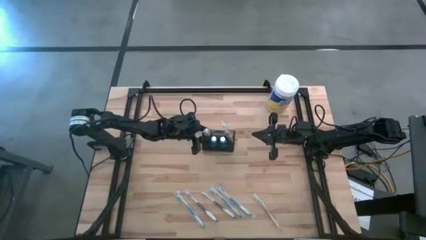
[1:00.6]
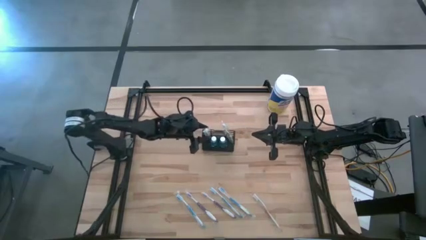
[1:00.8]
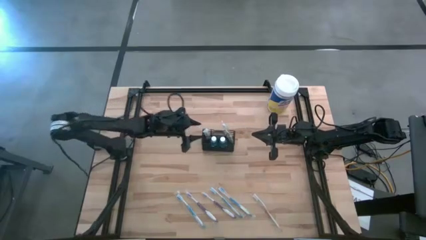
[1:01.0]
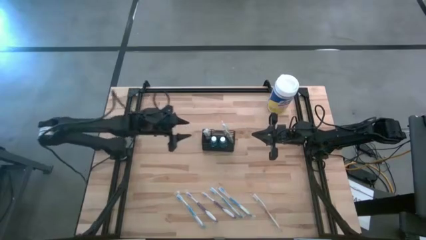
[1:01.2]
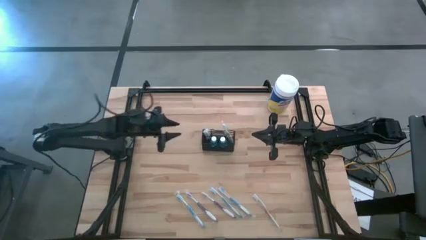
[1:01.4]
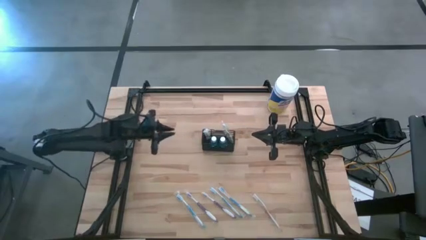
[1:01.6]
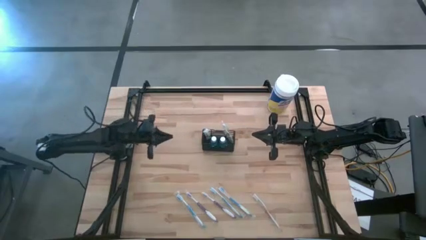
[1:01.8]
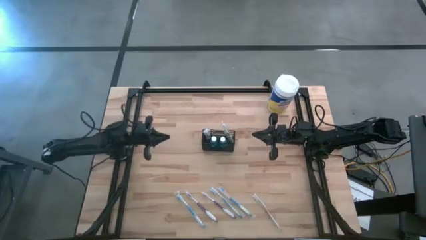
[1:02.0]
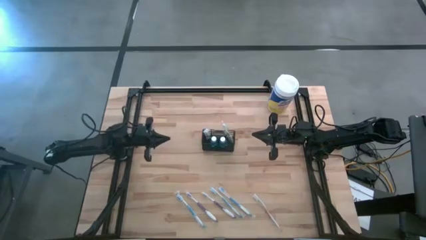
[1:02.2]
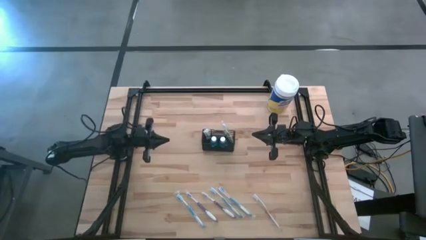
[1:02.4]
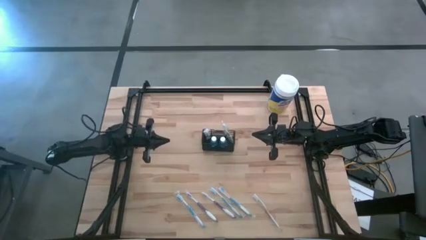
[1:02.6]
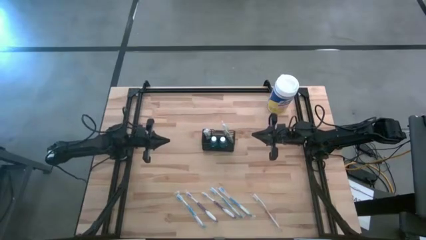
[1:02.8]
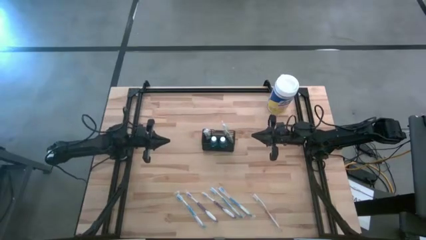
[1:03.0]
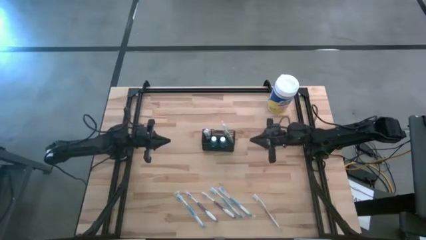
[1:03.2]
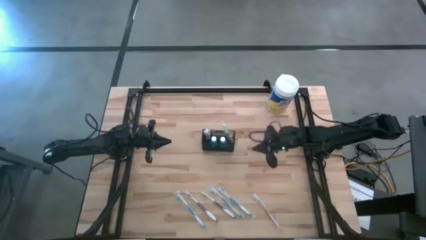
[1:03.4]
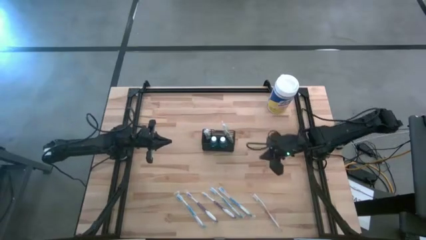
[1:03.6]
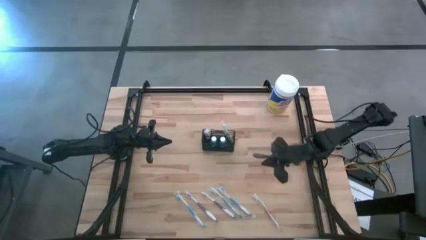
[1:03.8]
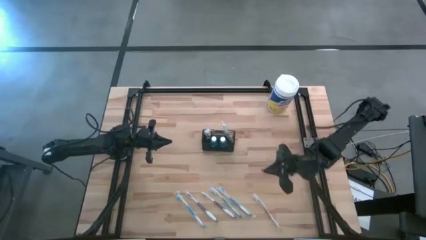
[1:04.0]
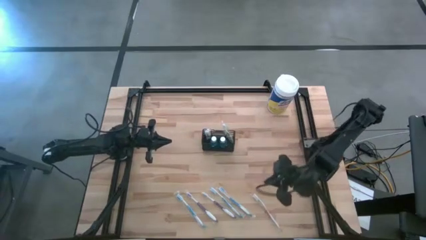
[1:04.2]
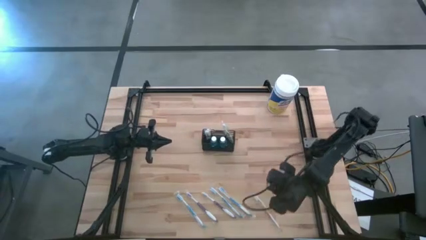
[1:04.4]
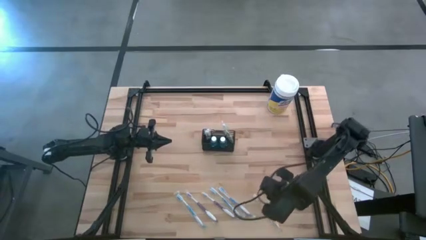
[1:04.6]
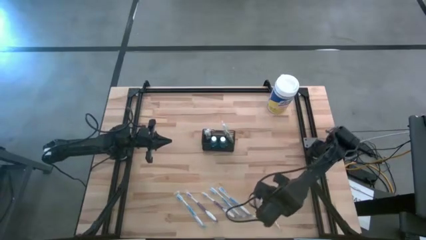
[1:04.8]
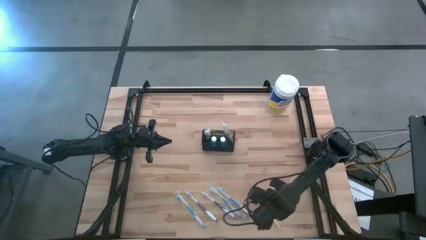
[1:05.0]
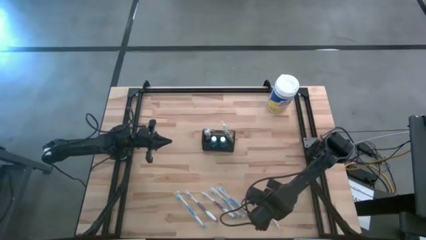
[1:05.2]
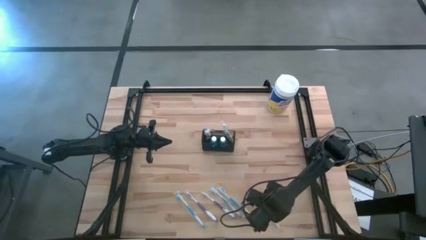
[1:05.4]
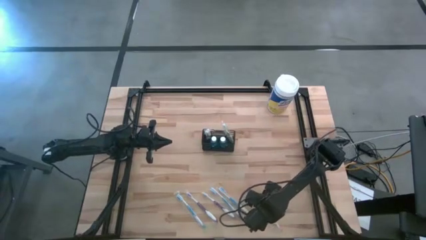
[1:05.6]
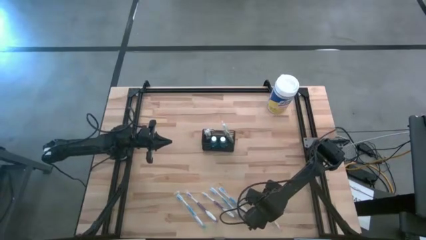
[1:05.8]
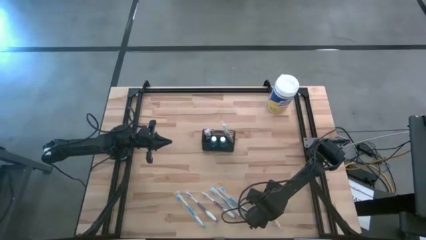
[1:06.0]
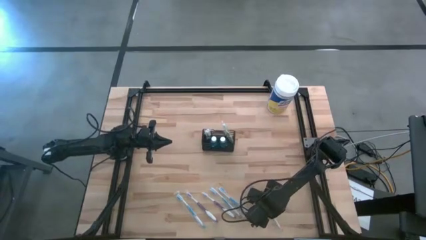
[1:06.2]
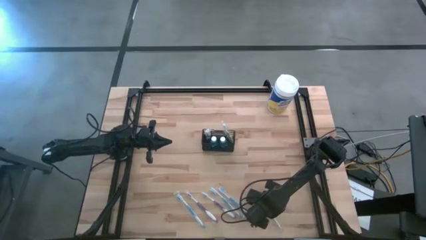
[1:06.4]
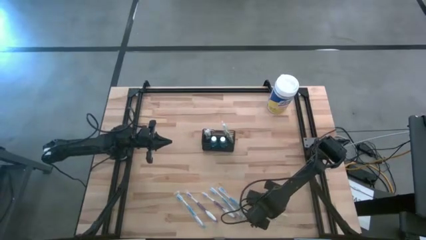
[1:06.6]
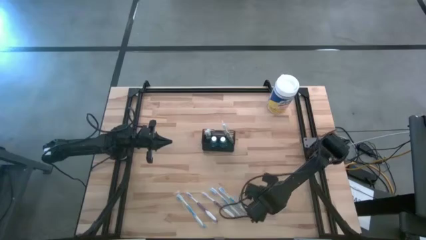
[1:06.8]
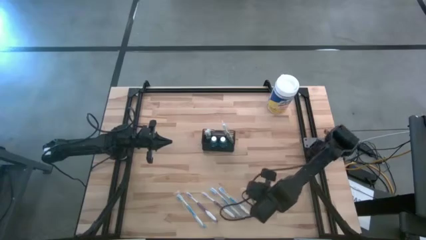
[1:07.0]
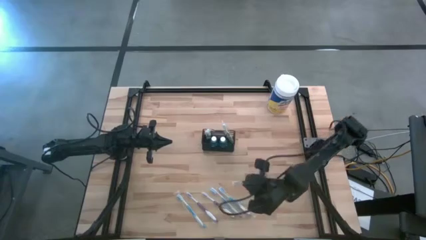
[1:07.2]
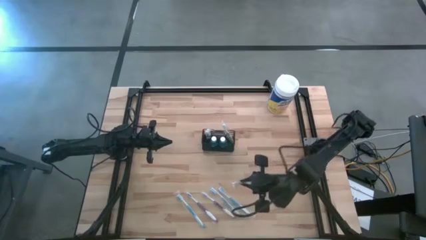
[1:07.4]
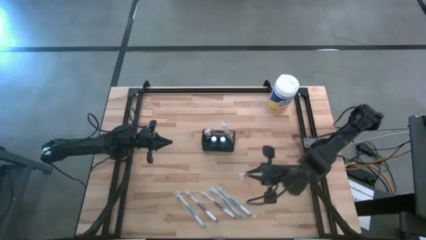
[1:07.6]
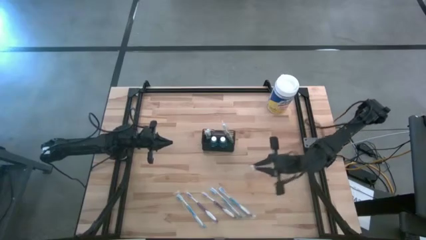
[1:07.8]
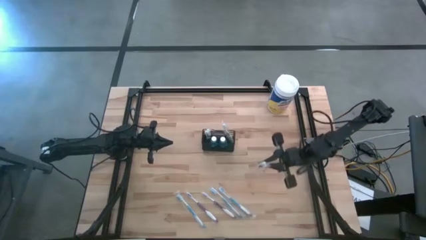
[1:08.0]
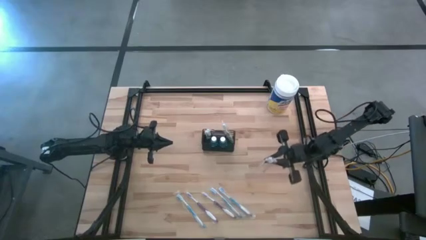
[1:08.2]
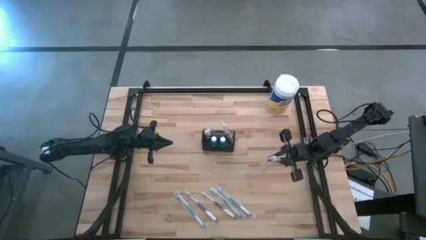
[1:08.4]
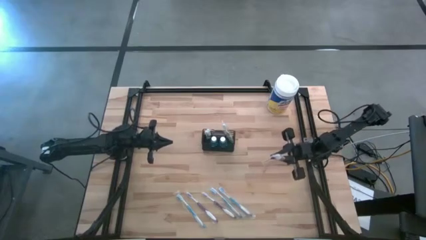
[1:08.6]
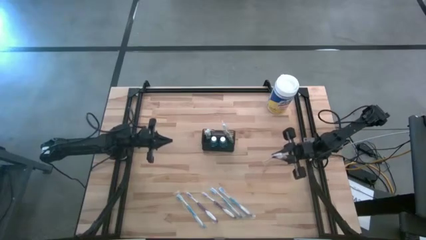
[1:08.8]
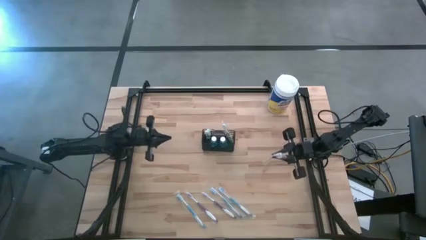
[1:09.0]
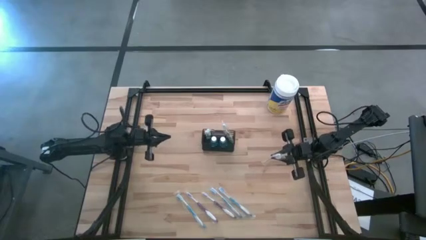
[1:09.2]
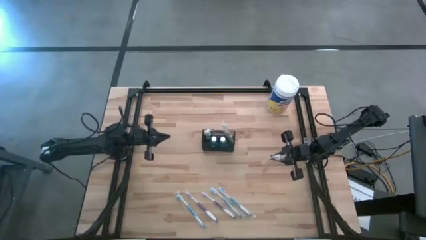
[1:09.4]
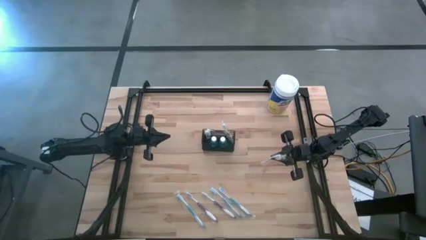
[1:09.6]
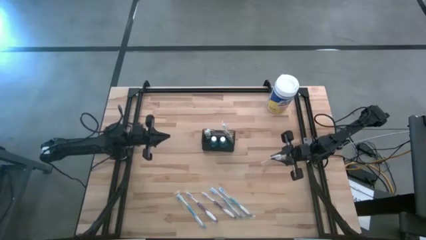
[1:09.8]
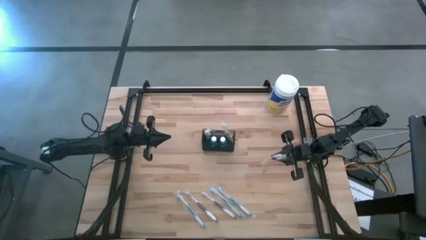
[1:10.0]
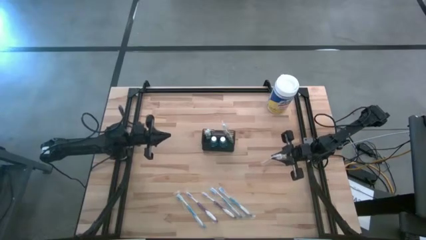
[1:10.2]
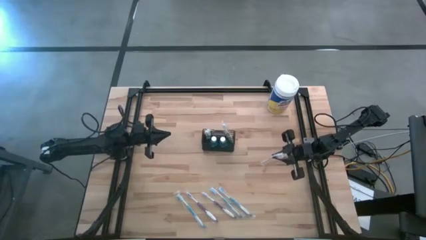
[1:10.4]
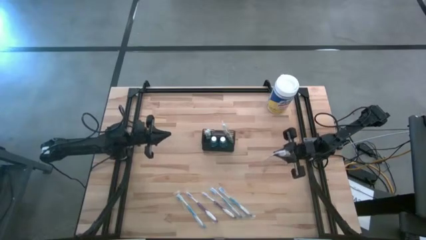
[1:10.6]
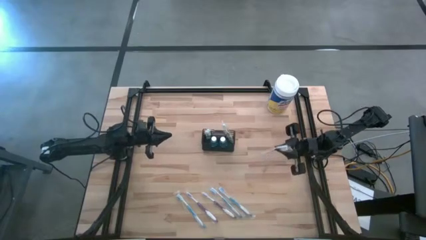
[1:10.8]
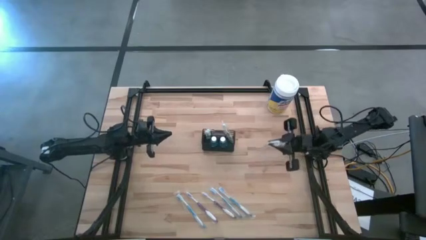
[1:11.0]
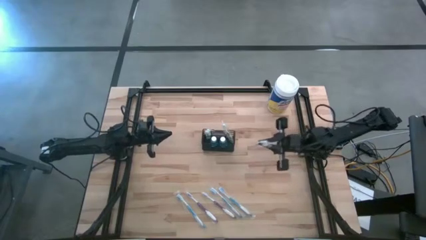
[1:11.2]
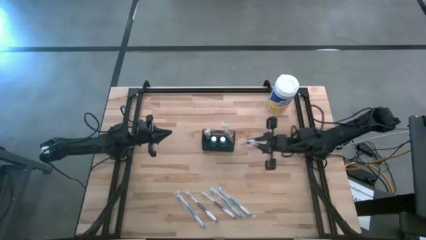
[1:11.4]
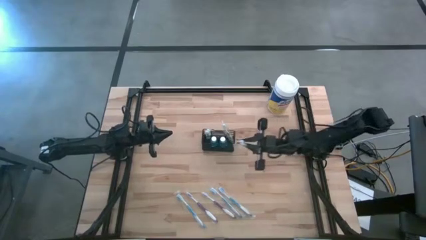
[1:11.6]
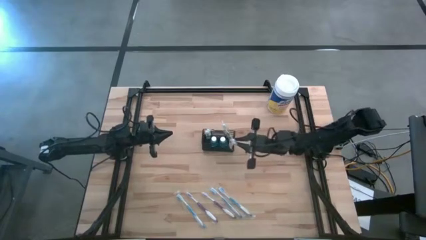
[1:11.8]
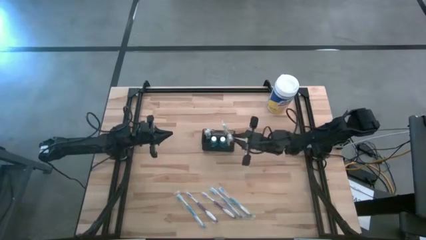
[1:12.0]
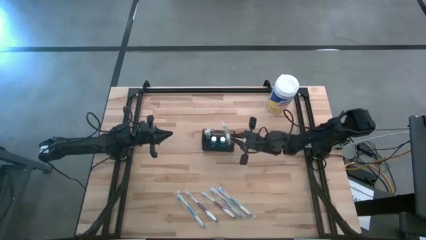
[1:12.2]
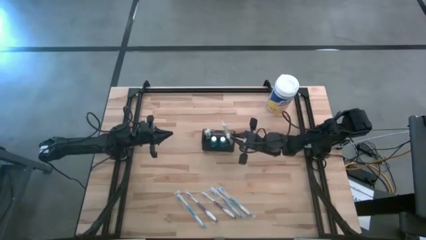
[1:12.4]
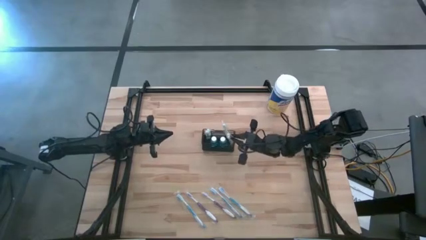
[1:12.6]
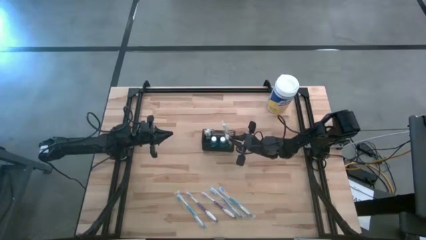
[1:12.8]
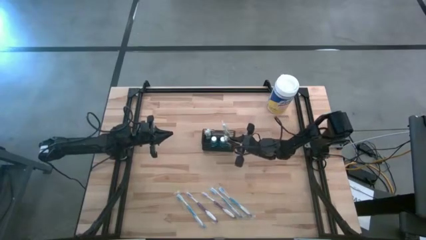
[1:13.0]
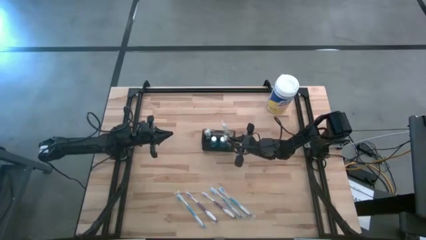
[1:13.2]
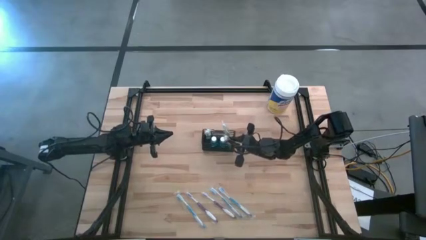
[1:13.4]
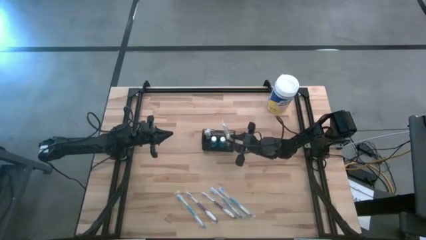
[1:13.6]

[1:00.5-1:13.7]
Task: Pick & Place toothbrushing station
Put the orange toothbrush into the wire organizer

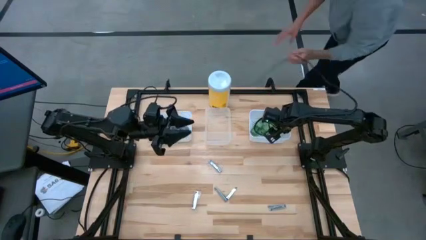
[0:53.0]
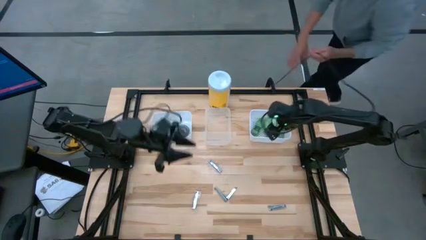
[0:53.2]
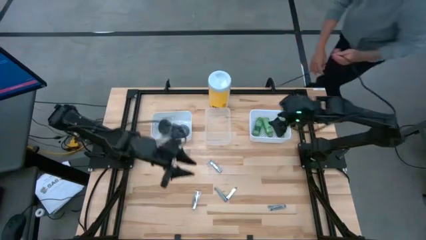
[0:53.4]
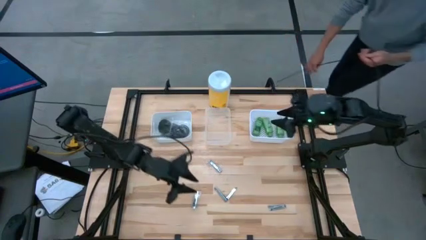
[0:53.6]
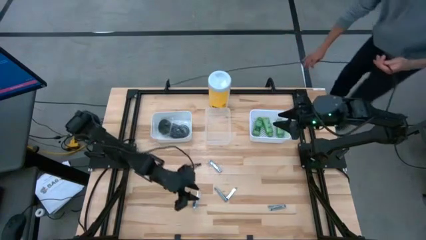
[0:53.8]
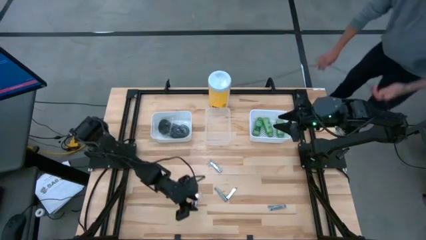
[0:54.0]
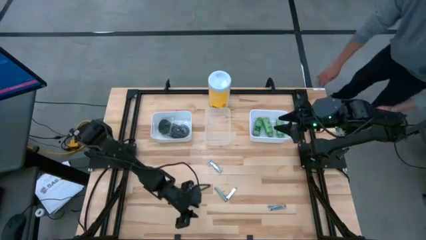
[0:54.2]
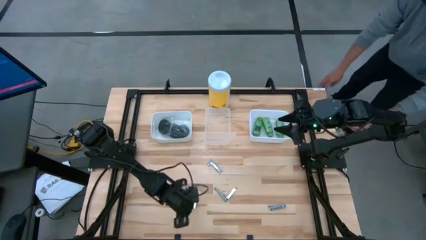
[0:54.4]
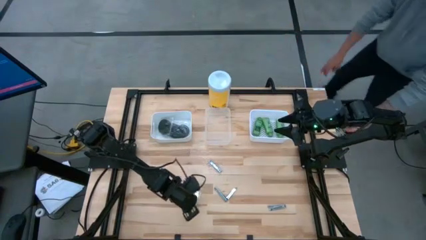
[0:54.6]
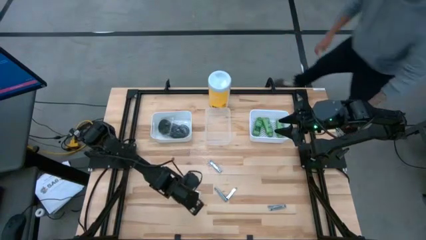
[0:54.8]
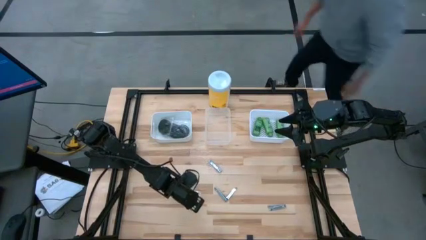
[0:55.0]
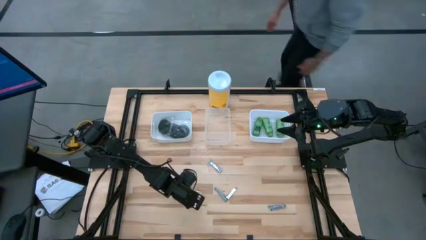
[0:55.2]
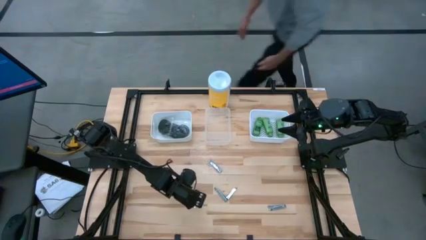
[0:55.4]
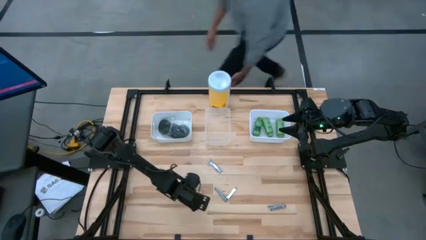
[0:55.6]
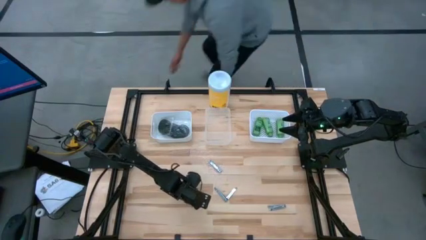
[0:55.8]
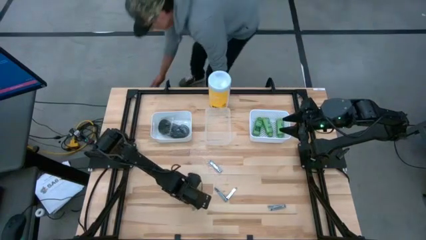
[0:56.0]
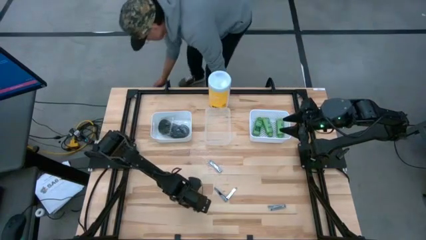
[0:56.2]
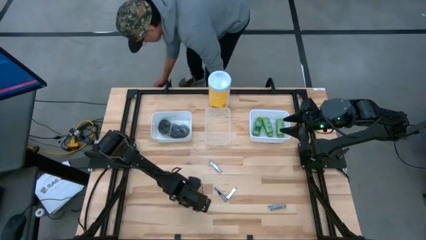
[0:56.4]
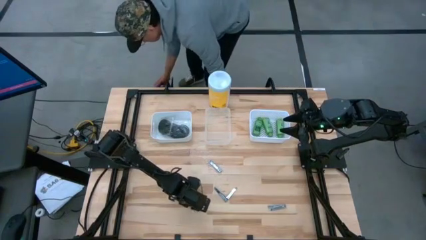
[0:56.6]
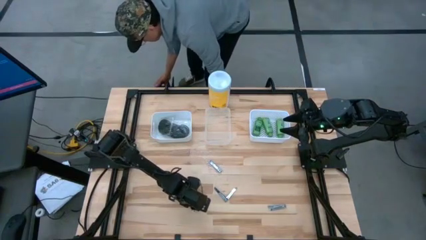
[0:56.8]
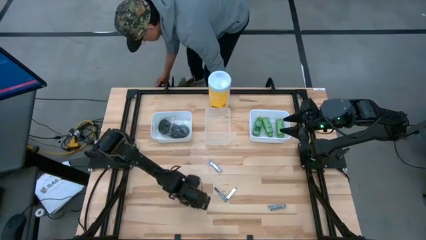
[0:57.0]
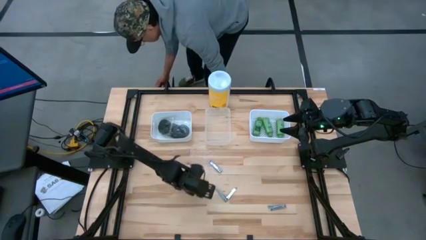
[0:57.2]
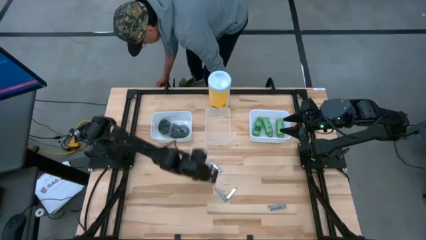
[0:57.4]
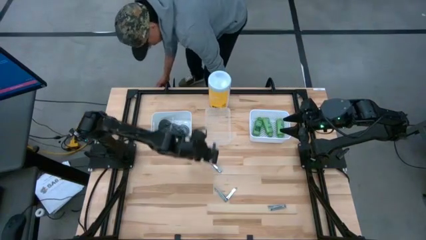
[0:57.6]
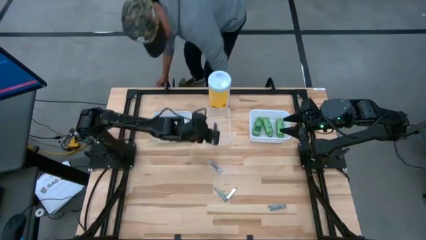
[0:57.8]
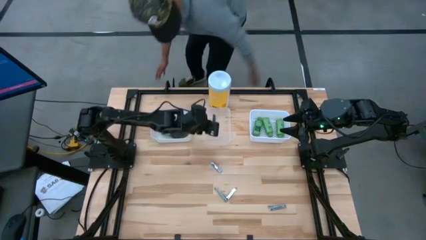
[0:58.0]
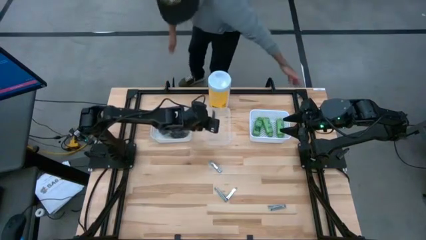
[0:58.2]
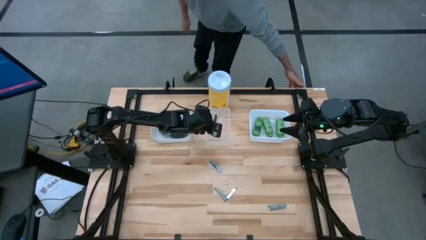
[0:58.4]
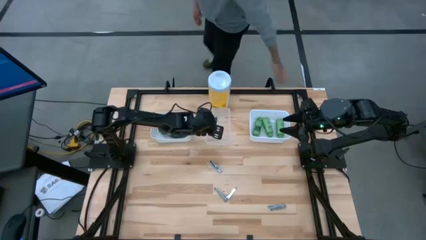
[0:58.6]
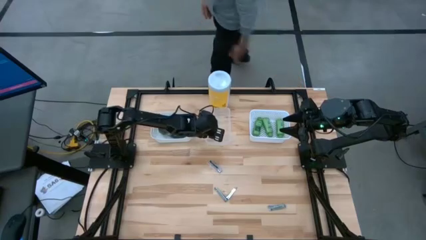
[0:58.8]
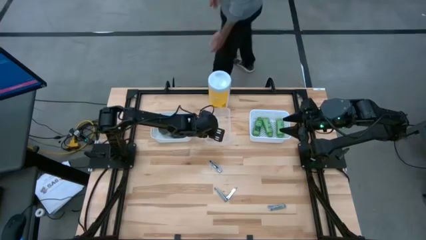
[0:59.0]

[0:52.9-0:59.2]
Task: Pick & Place Travel size toiletries
Put the silver nail cutter into the transparent bin
